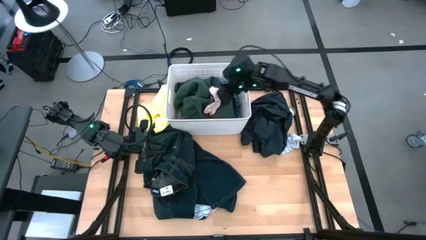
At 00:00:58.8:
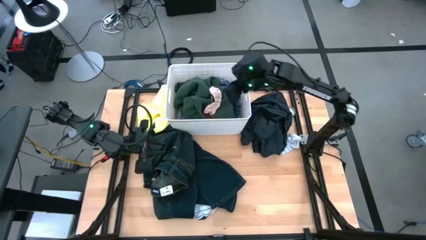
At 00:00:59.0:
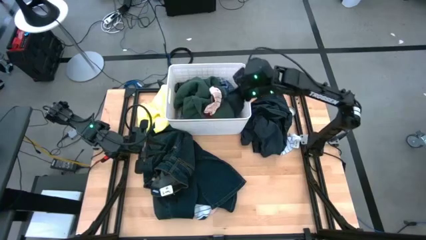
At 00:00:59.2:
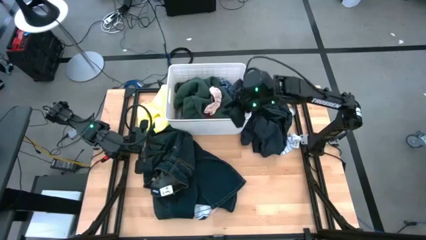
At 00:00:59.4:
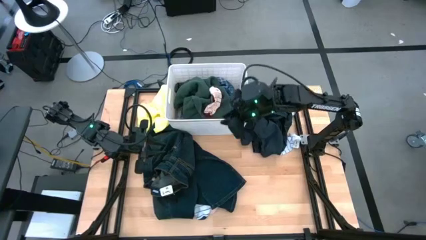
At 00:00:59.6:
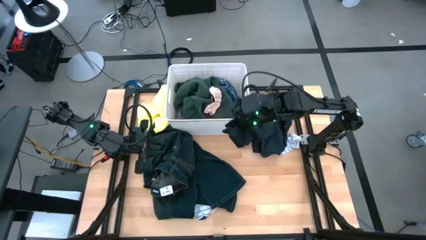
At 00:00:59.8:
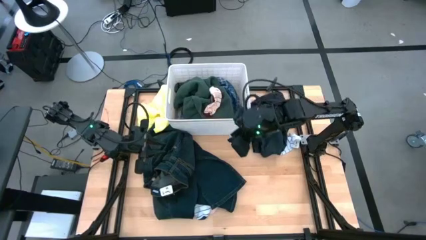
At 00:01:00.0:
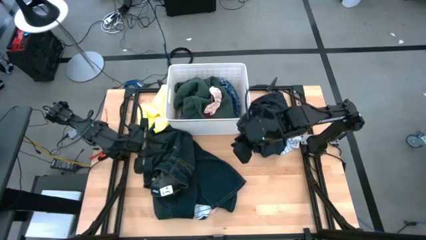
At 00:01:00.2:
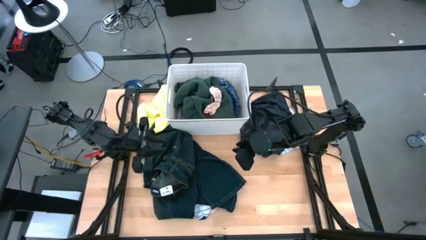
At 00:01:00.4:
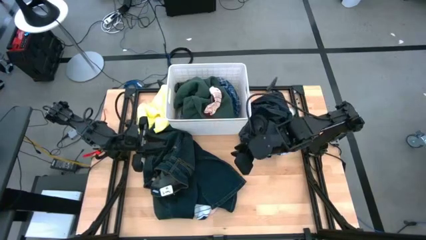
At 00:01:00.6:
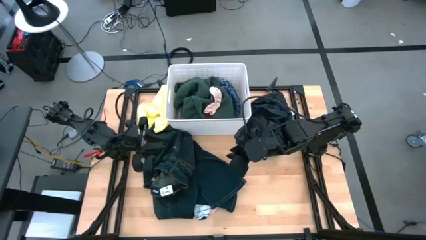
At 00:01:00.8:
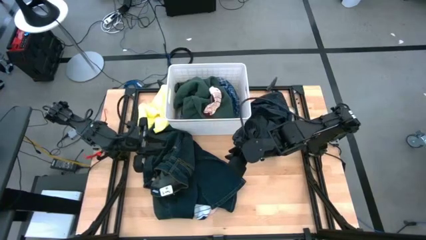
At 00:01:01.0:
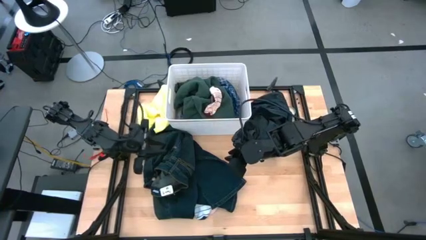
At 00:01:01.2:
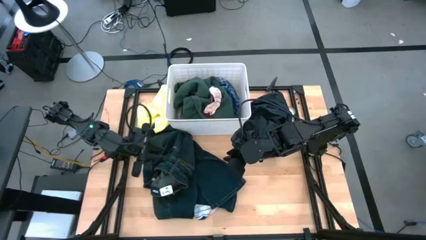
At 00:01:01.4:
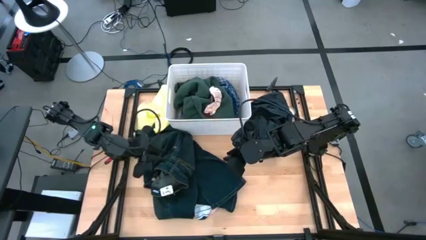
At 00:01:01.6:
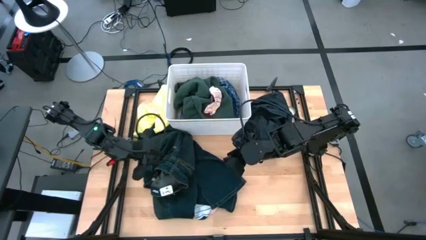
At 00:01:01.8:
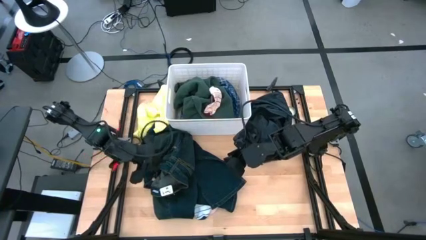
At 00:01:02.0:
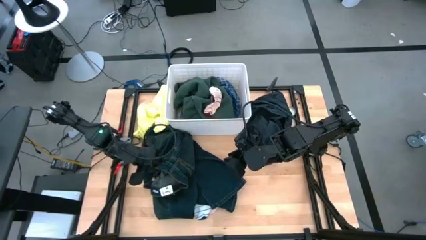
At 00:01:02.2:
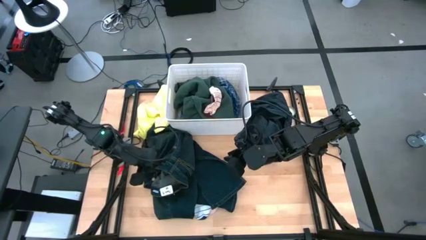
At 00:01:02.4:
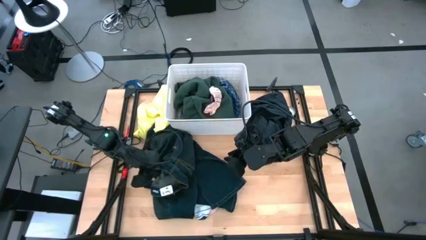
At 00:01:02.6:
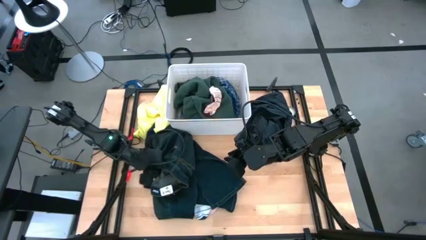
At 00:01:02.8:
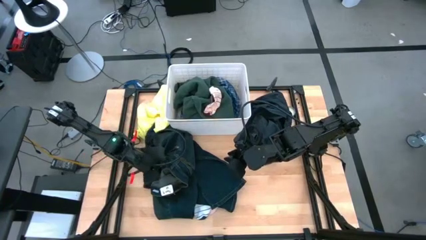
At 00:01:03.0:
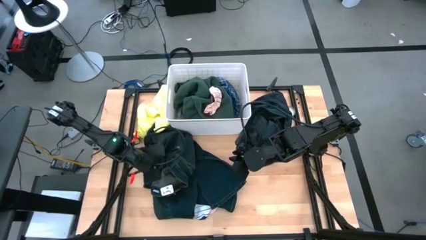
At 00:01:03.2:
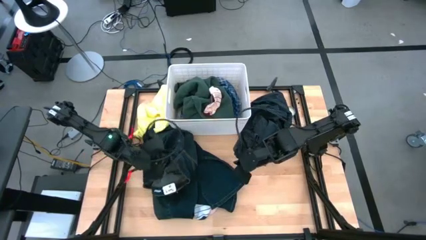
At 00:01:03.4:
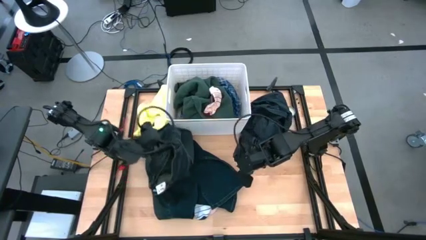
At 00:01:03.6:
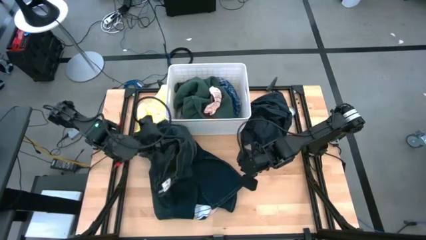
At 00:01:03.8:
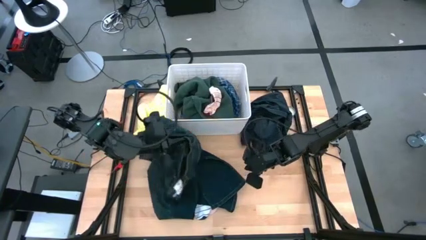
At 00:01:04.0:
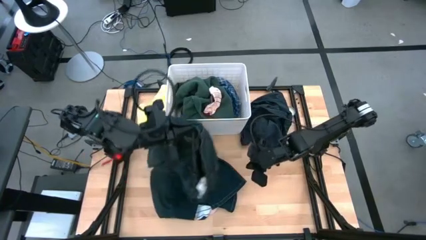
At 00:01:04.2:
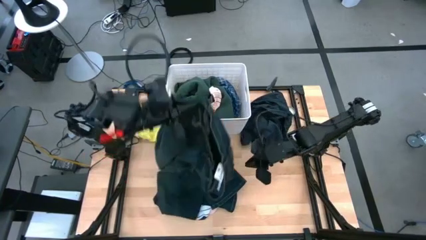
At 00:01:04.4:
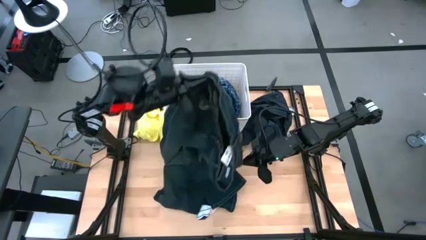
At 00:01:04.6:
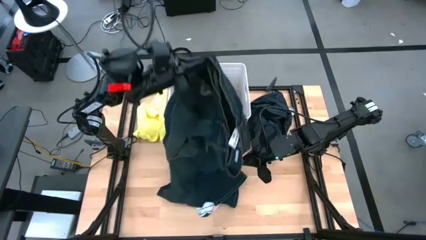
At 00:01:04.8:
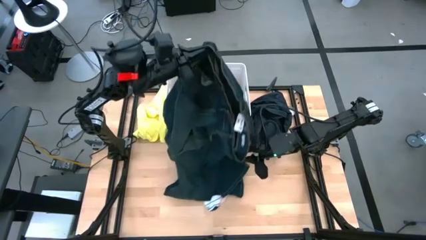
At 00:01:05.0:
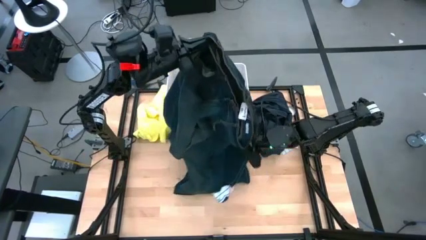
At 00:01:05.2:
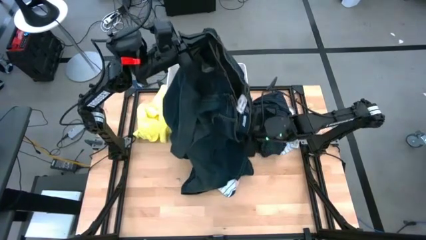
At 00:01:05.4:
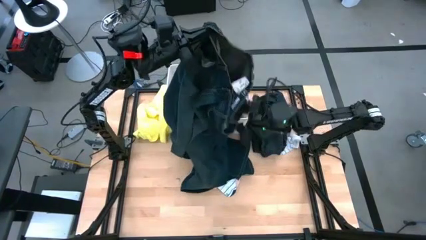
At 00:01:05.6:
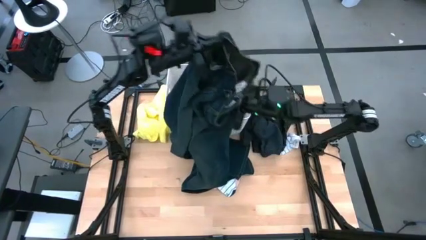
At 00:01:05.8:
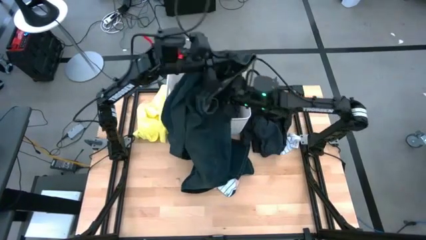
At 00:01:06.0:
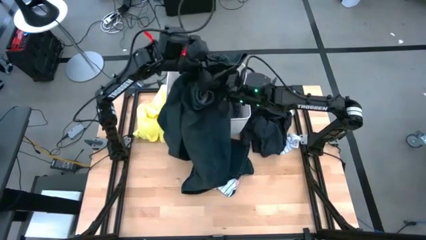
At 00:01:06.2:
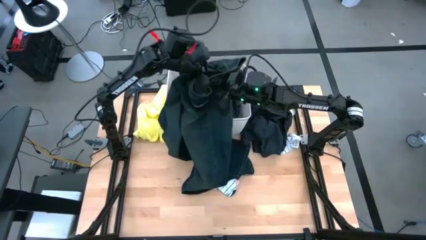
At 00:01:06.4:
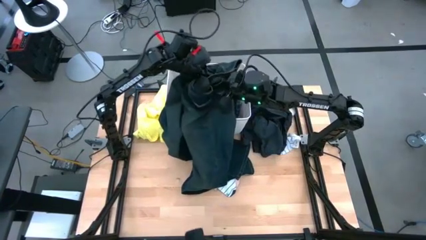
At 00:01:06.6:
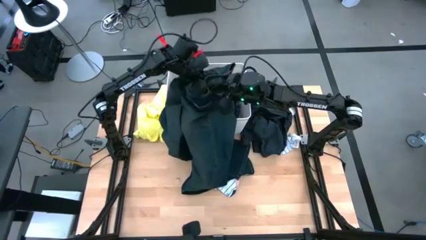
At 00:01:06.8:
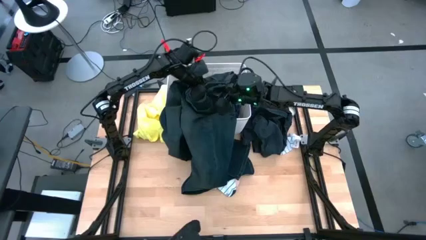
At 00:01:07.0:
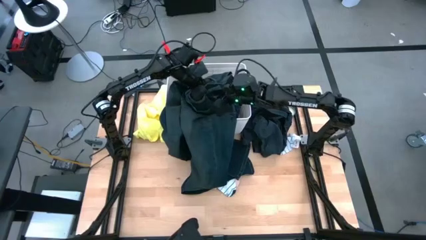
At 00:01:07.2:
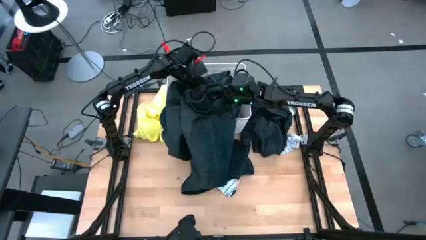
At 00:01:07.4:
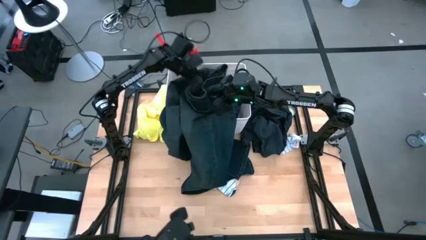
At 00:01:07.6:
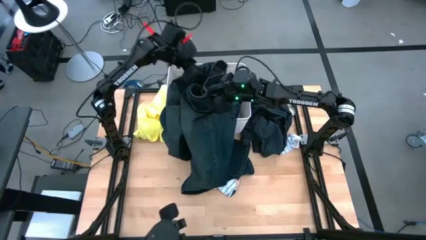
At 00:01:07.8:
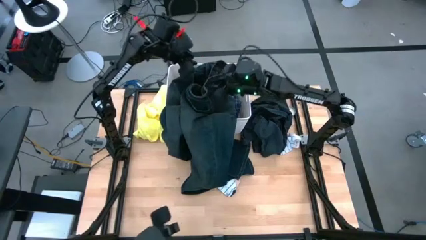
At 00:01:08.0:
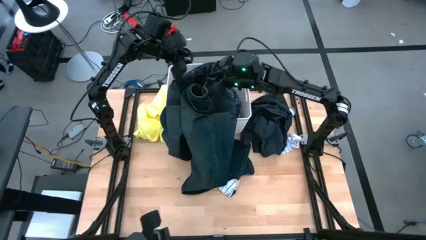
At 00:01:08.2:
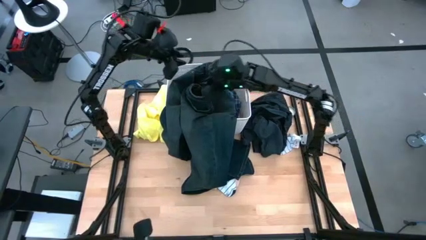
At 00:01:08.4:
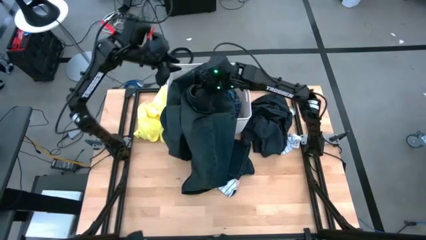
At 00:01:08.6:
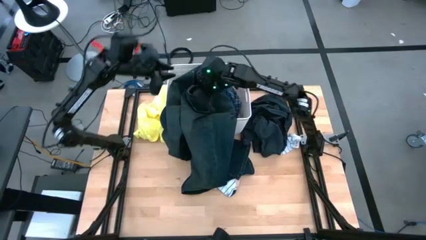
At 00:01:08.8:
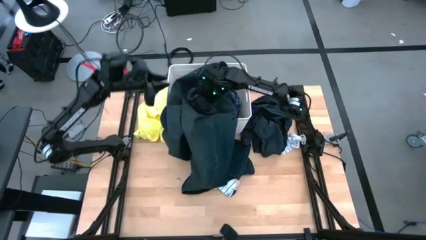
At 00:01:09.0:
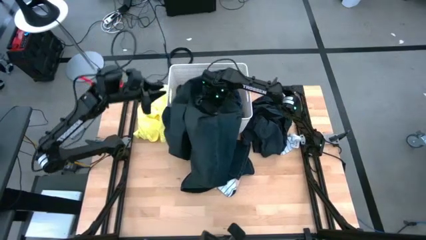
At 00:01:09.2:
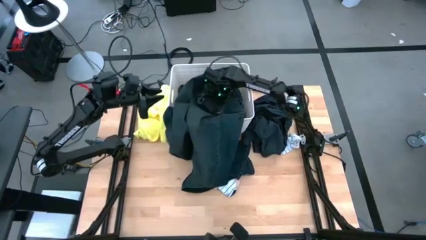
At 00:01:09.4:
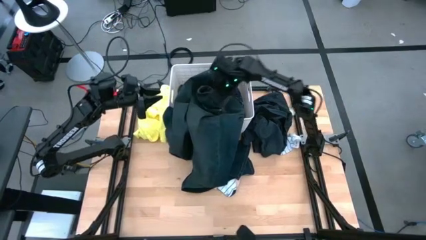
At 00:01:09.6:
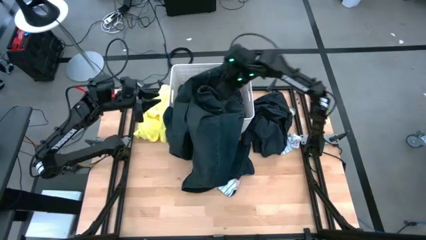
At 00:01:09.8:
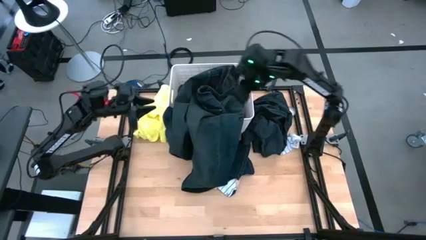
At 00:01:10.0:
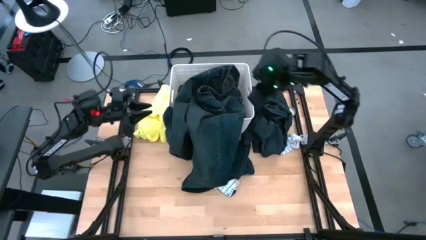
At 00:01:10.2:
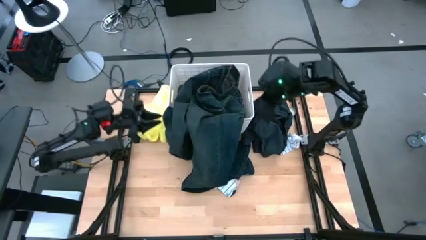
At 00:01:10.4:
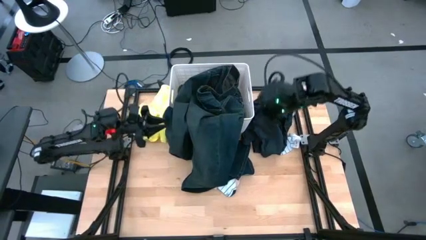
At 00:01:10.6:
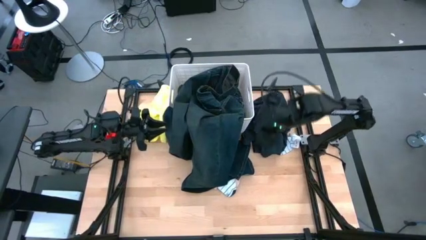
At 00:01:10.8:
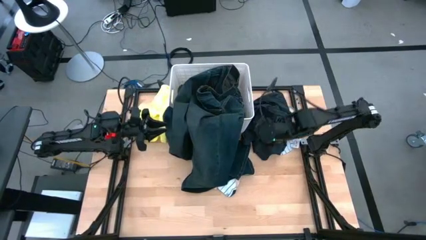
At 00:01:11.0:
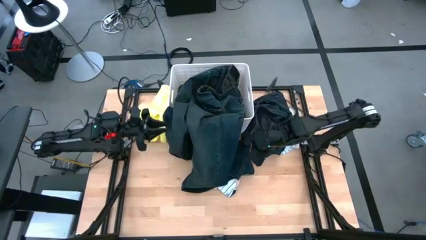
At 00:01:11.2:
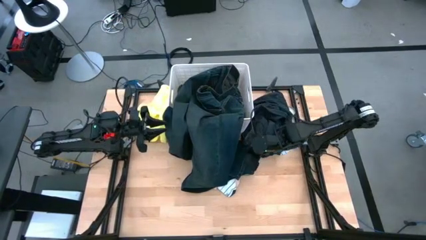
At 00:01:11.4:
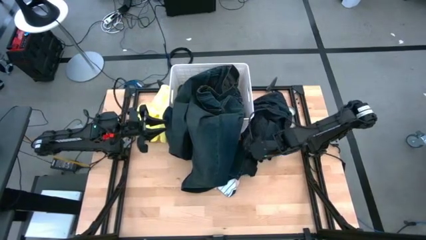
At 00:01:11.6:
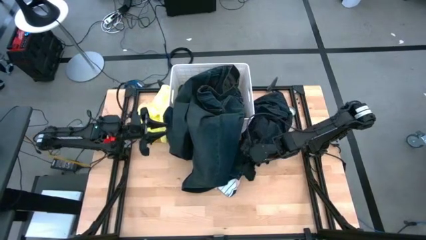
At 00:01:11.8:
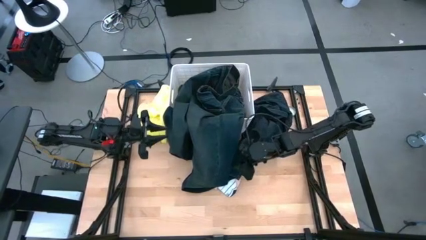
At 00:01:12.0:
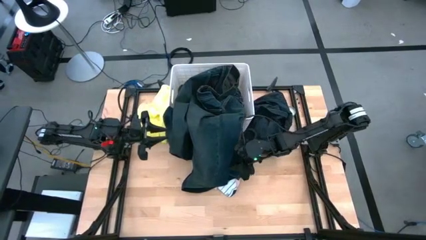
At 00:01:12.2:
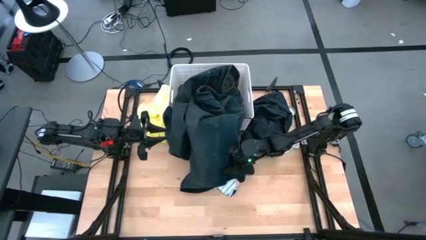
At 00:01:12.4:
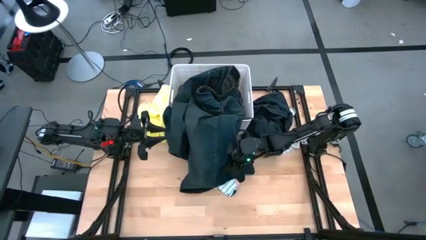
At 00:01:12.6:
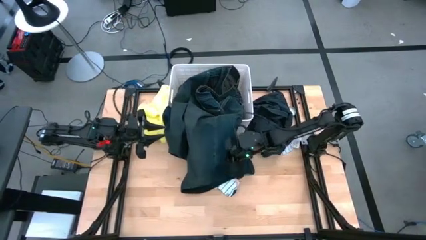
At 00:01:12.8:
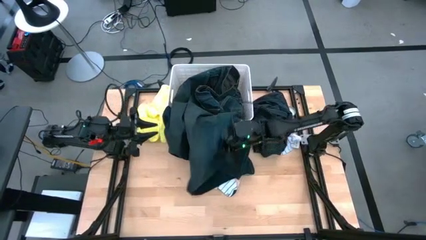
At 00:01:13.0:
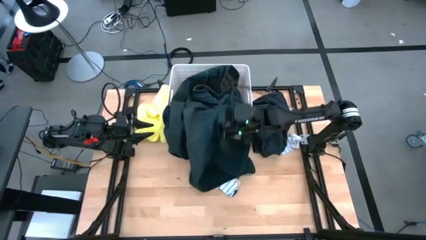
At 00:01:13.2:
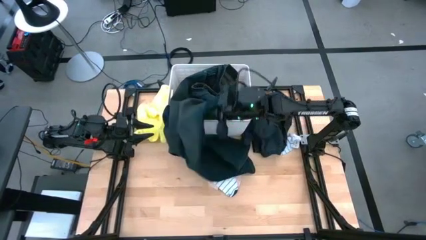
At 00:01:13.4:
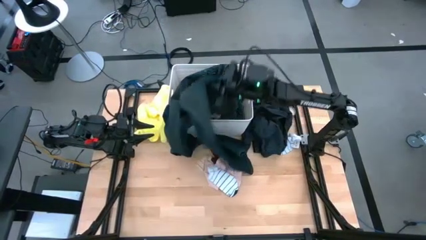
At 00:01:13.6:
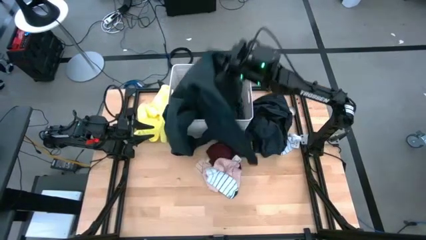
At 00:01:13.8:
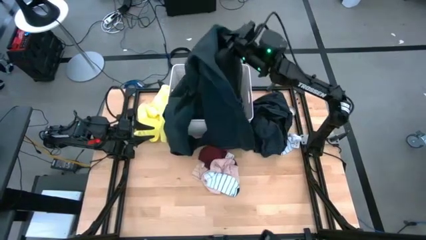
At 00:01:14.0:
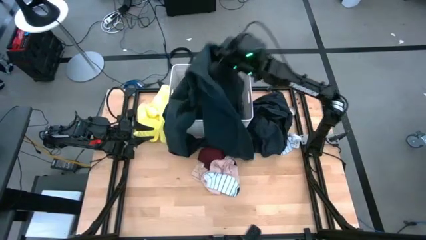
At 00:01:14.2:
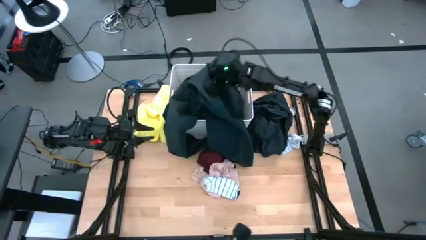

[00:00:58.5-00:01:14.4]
Task: Sort clothes
Put the blue jeans into the laundry organizer
